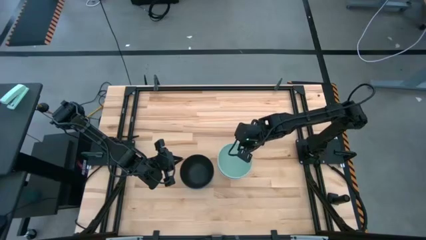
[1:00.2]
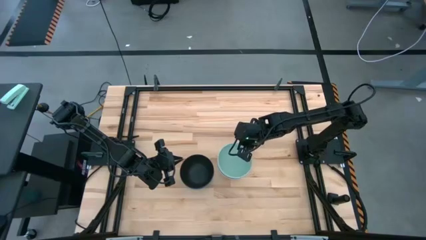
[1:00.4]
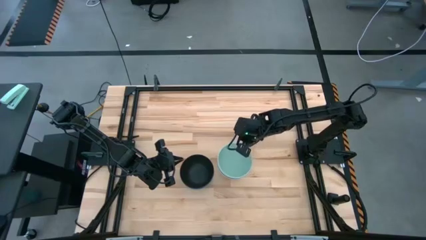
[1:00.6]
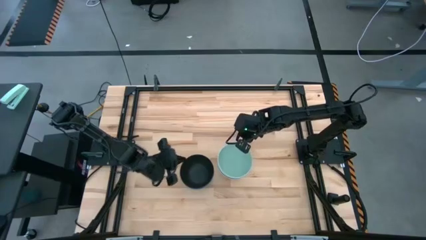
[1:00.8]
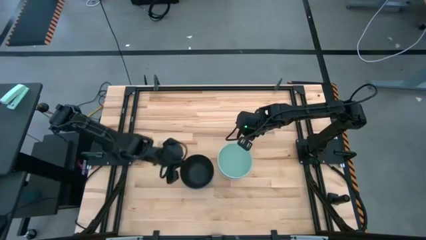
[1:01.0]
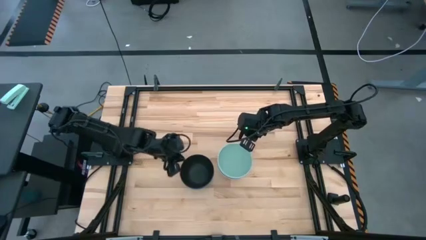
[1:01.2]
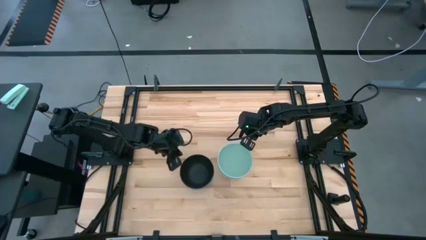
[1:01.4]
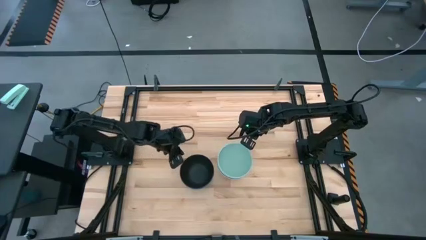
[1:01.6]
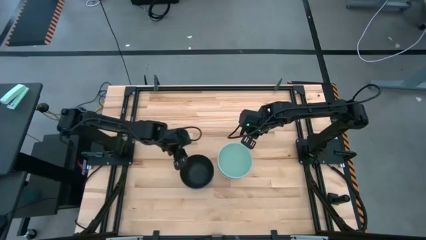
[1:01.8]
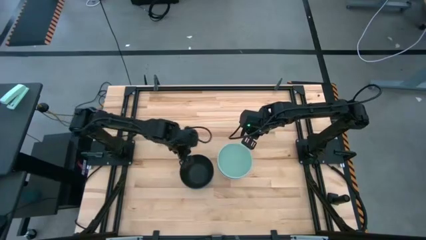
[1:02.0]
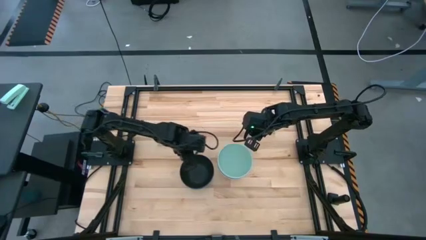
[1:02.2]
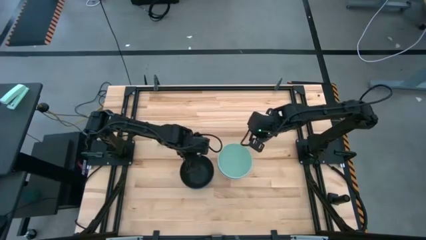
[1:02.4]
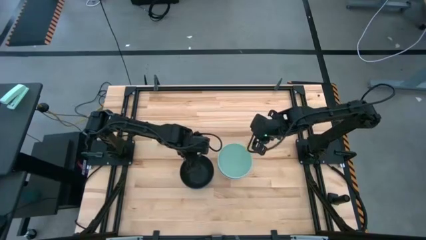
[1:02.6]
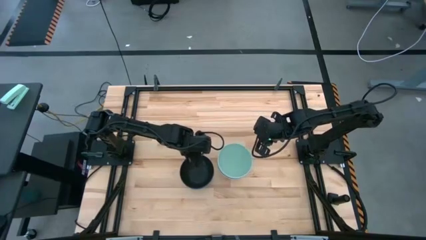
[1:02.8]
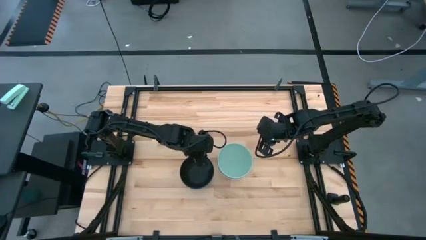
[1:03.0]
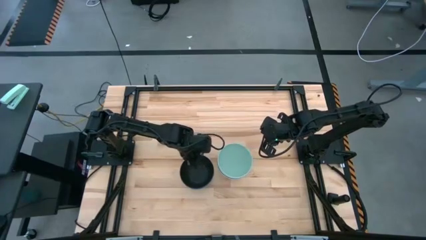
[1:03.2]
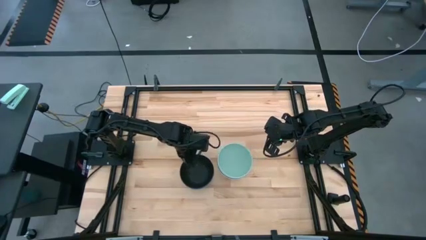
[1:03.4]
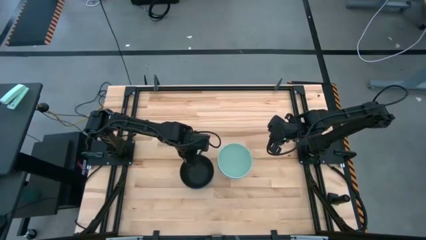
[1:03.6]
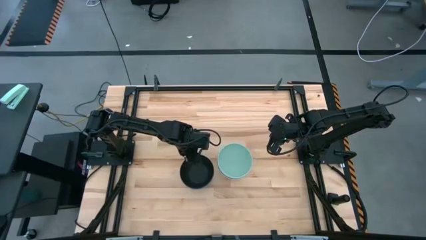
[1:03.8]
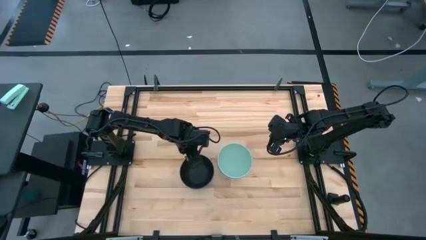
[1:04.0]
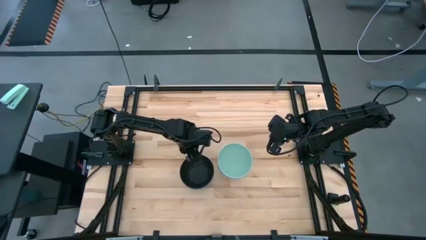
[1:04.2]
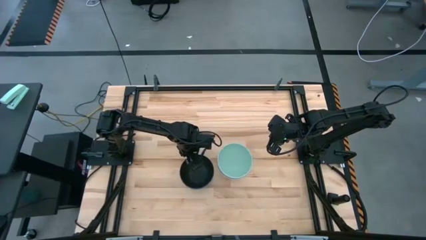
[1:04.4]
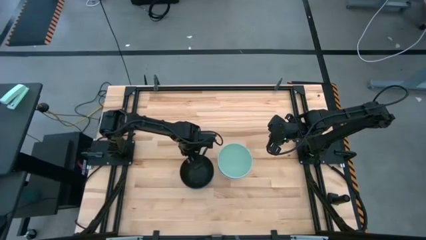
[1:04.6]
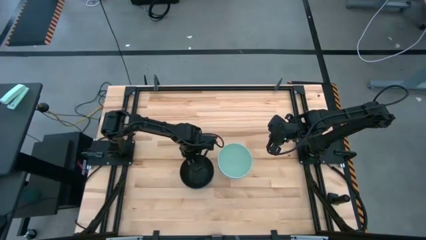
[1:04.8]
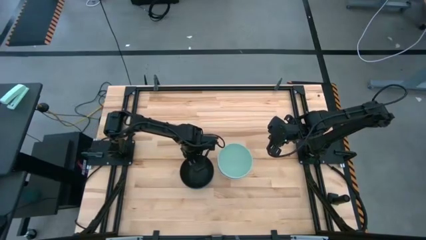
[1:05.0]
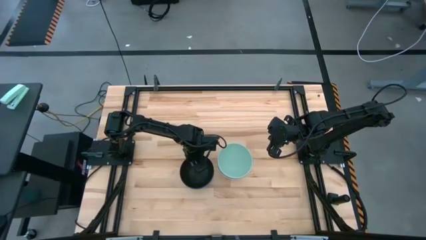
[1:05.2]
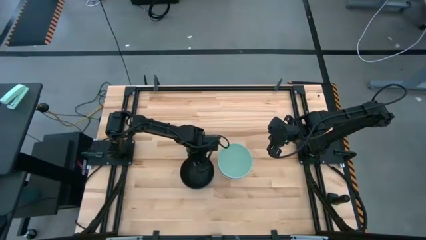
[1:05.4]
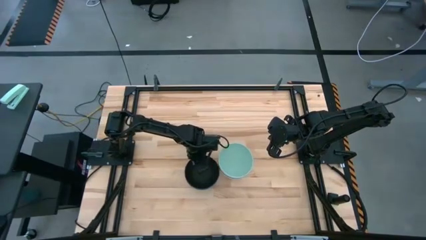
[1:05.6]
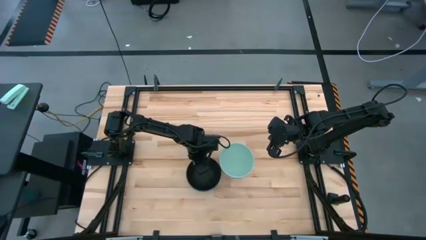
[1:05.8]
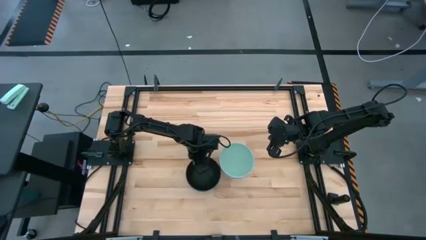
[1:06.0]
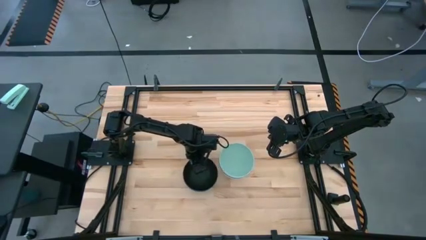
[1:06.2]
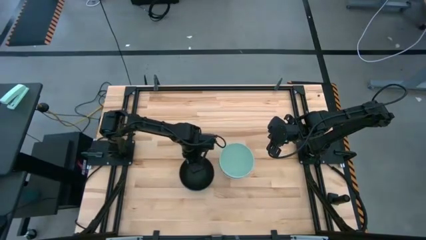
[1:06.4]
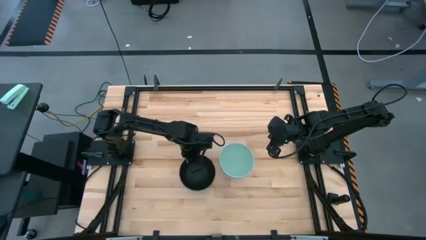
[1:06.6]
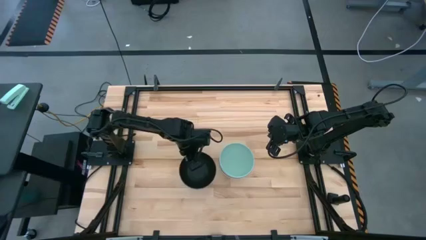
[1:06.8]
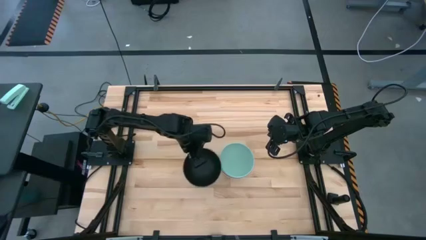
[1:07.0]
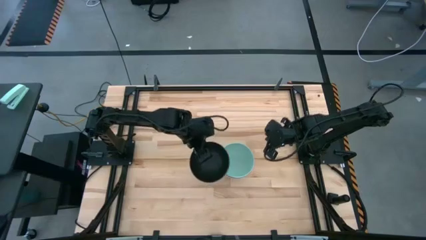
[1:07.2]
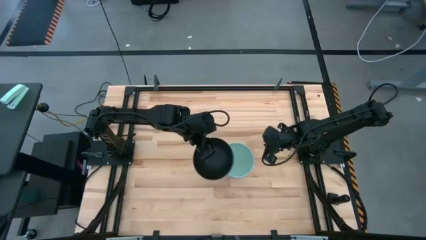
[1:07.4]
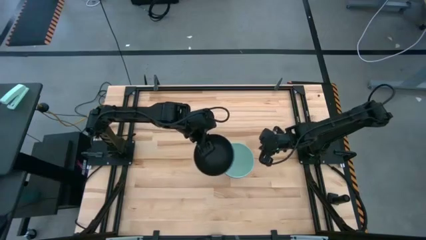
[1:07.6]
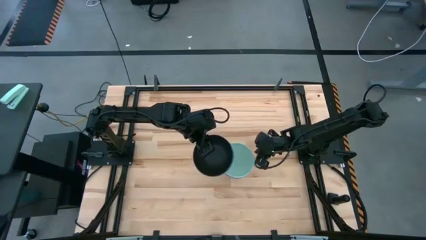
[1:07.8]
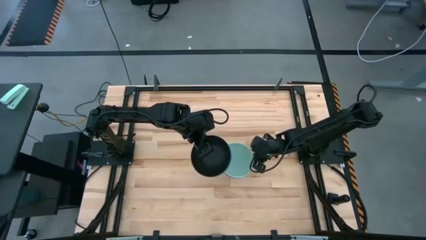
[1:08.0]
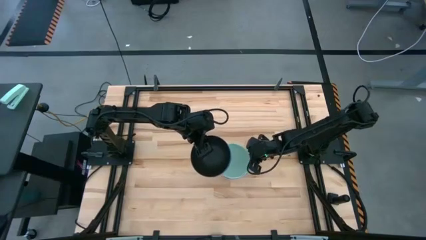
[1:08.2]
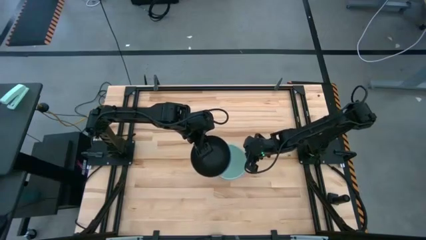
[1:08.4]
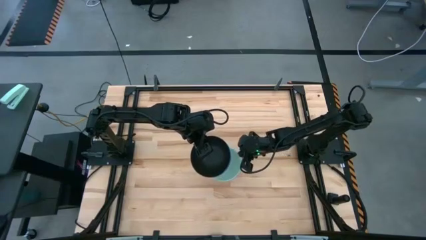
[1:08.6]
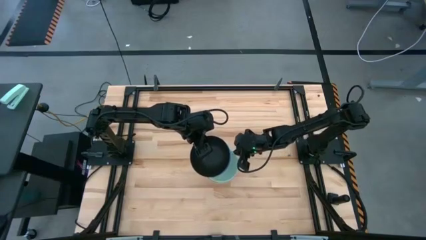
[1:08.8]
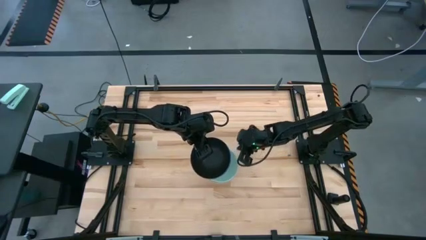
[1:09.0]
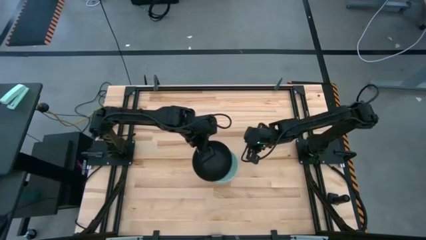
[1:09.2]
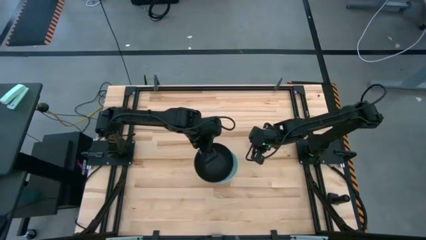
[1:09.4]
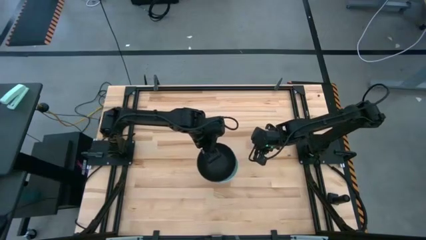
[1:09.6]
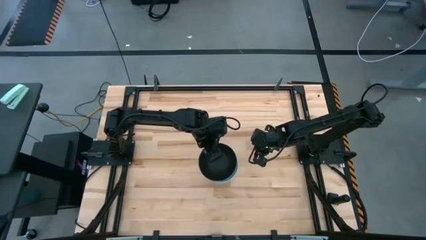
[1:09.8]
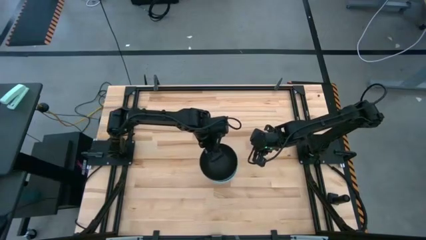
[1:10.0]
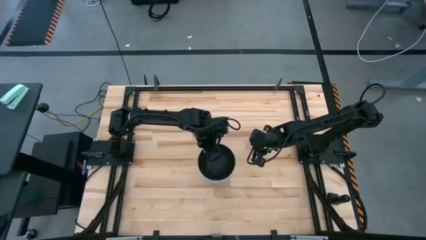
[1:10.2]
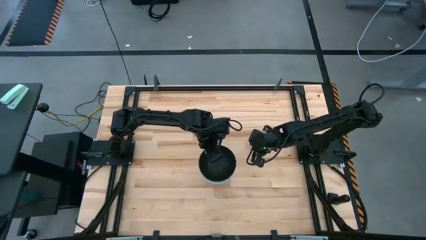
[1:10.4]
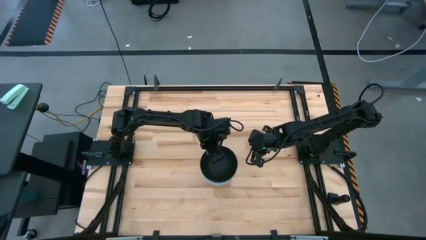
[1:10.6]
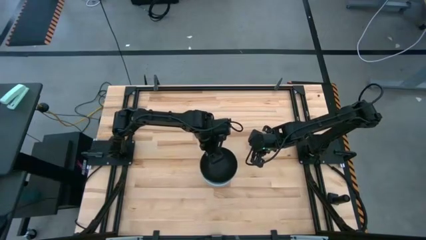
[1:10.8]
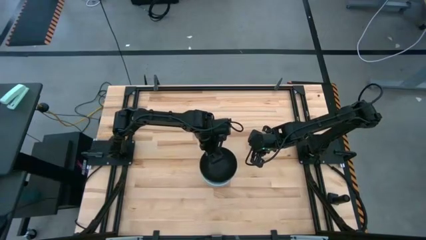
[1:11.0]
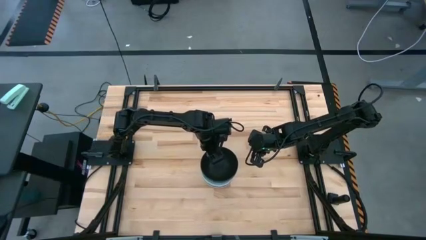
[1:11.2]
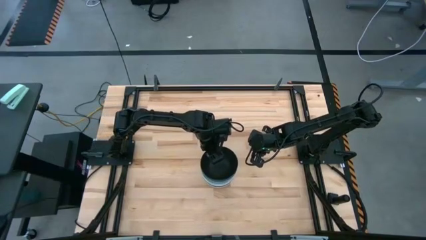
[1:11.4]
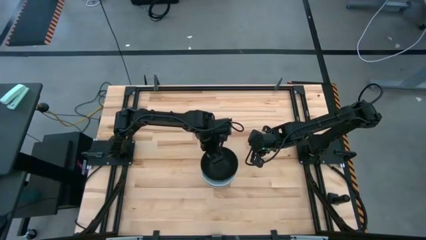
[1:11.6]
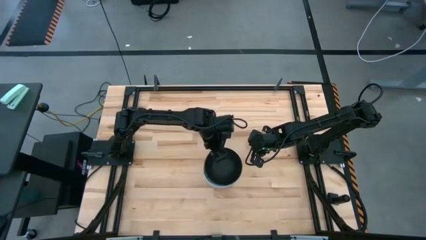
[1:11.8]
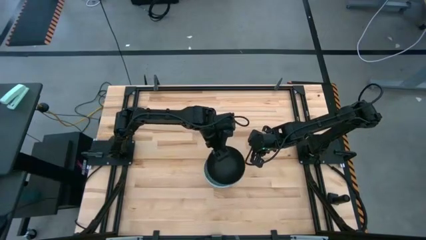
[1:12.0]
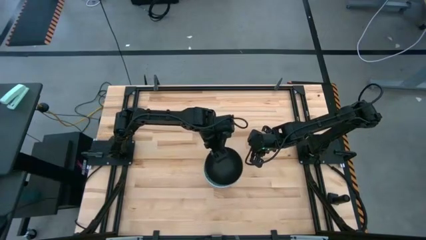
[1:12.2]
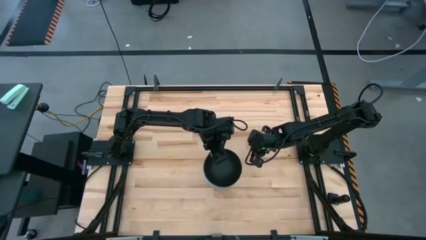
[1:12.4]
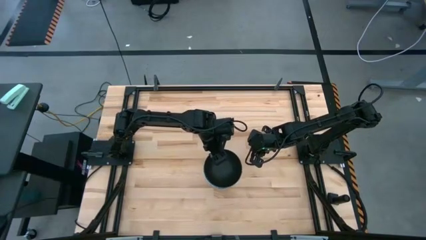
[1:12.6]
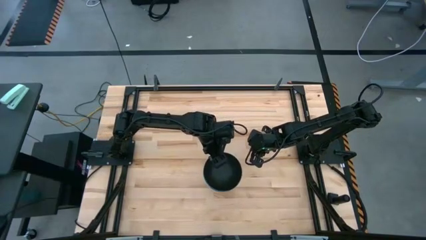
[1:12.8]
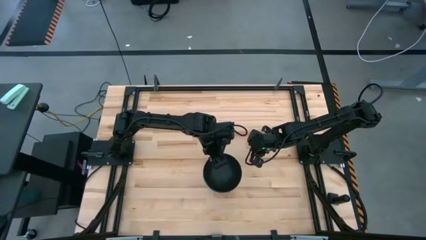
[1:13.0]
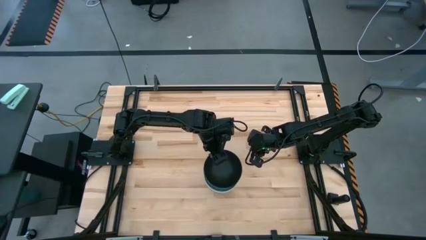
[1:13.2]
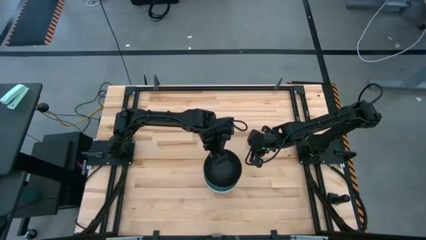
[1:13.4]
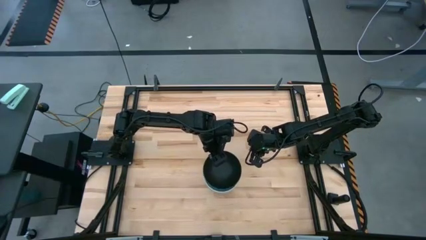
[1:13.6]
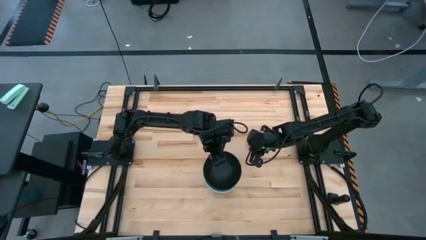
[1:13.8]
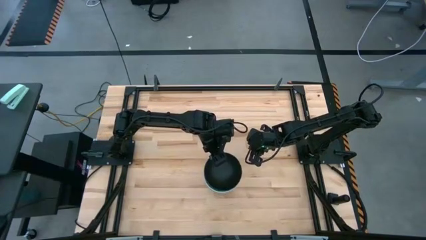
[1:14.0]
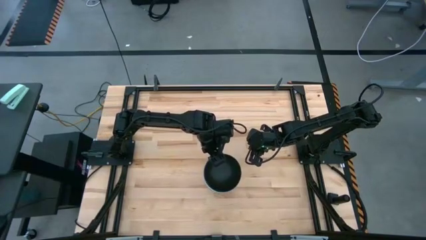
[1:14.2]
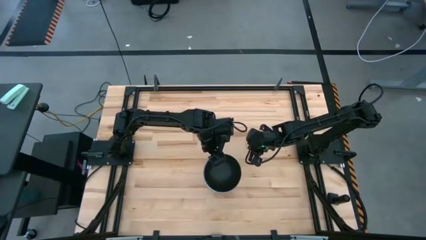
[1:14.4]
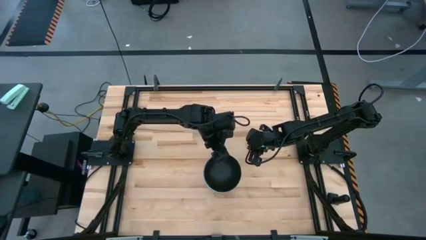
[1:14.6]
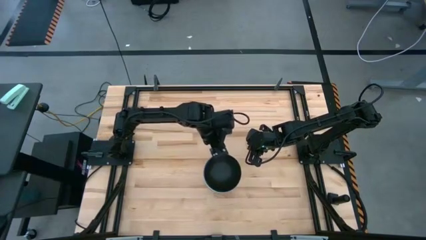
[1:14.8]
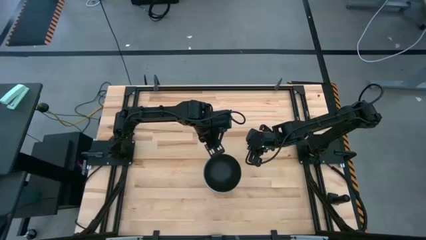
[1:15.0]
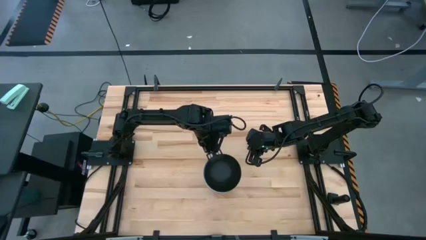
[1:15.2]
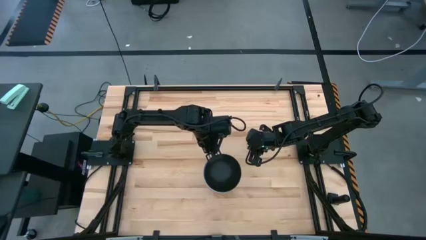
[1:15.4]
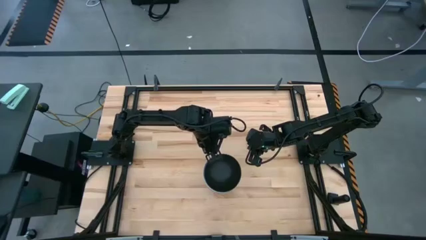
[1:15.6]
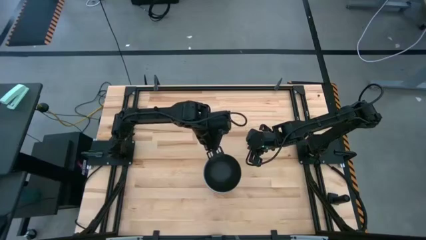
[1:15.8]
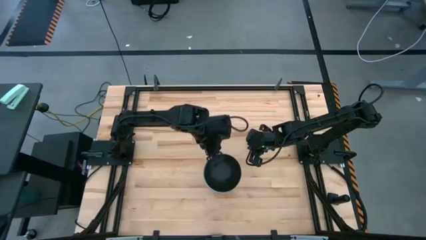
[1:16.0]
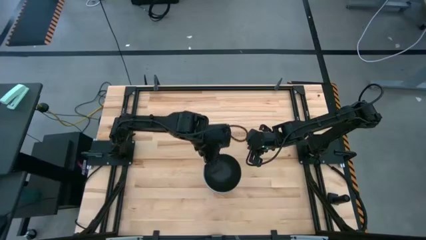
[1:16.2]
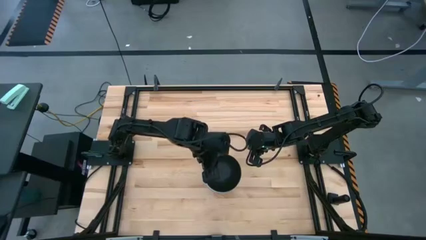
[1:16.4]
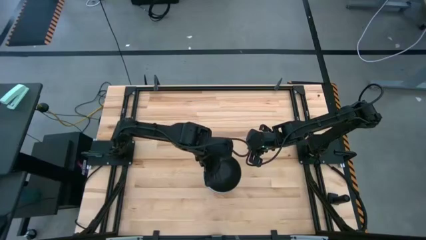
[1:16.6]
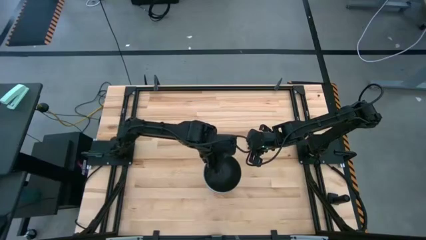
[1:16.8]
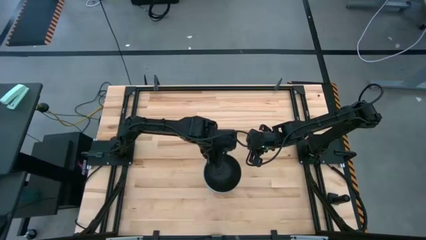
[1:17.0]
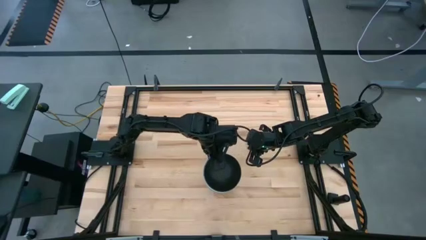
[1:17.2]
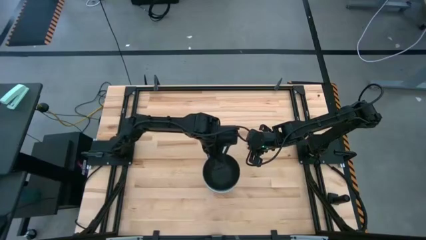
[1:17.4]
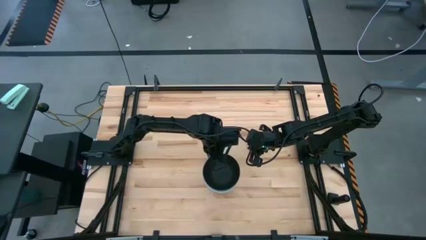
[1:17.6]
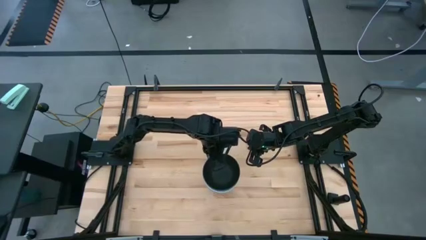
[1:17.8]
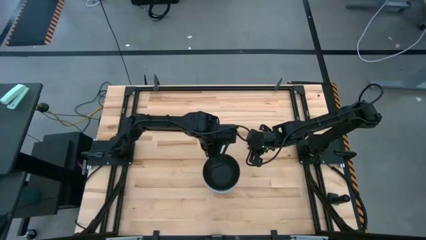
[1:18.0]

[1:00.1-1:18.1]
Task: Nest bowls inside each other
Stack the stacked bowls on top of the light blue bowl
